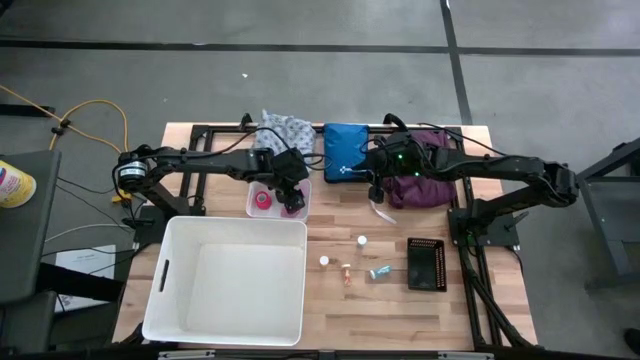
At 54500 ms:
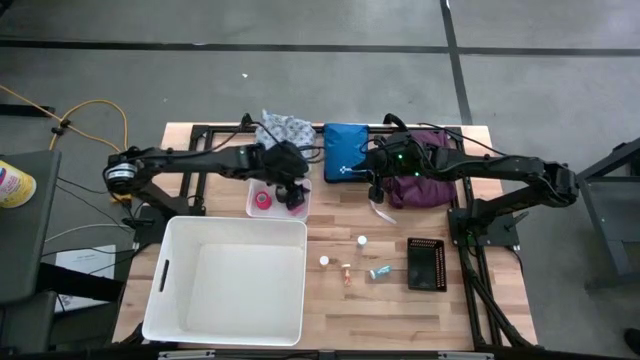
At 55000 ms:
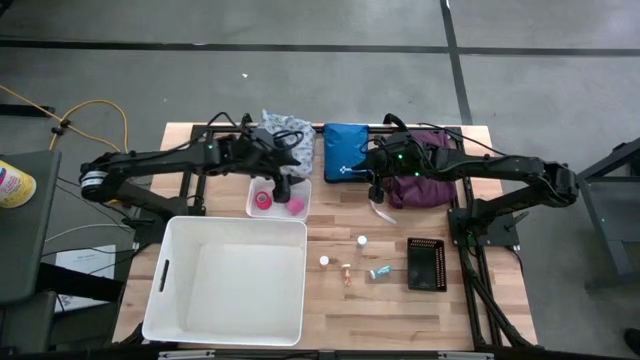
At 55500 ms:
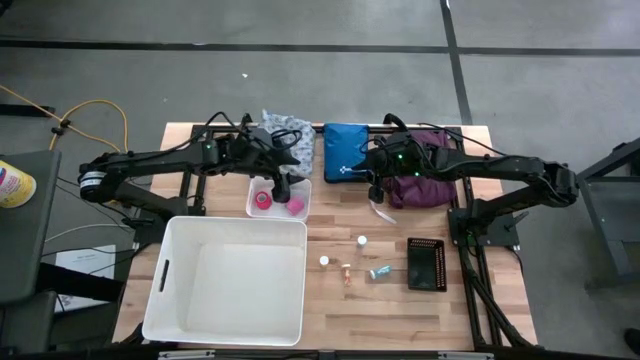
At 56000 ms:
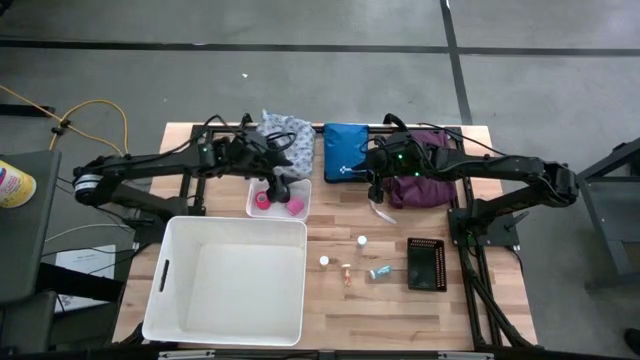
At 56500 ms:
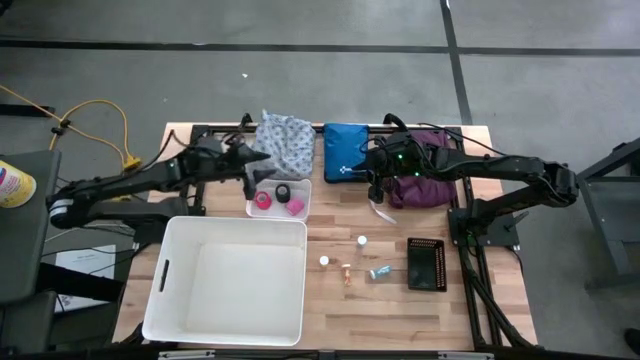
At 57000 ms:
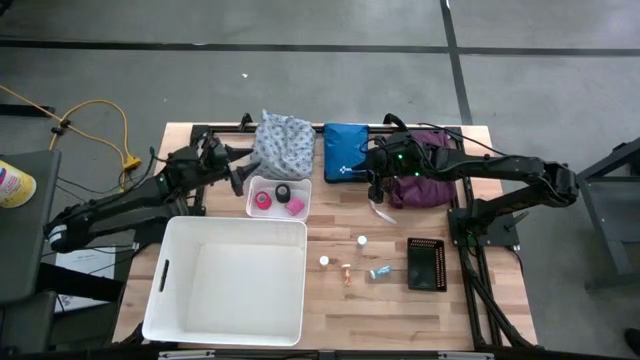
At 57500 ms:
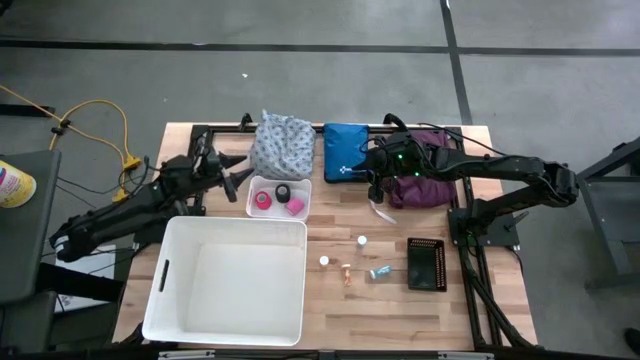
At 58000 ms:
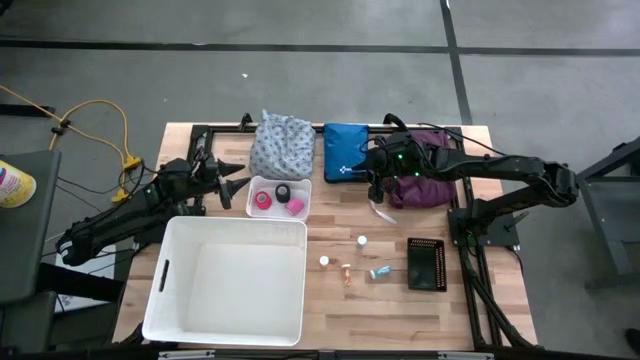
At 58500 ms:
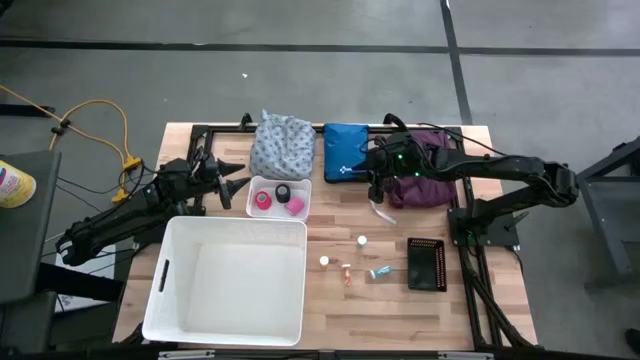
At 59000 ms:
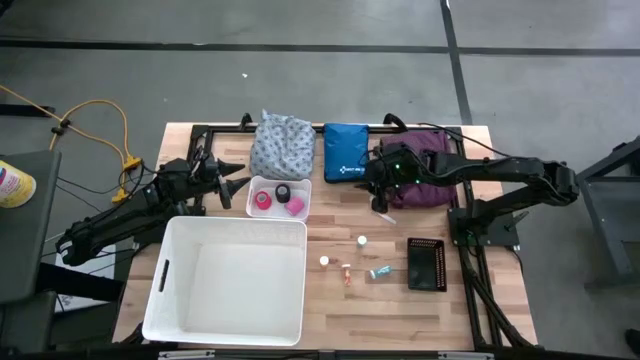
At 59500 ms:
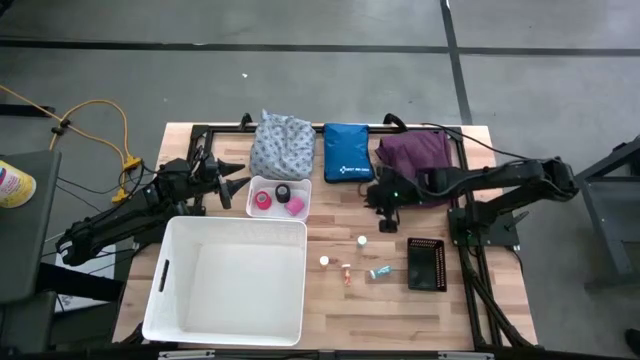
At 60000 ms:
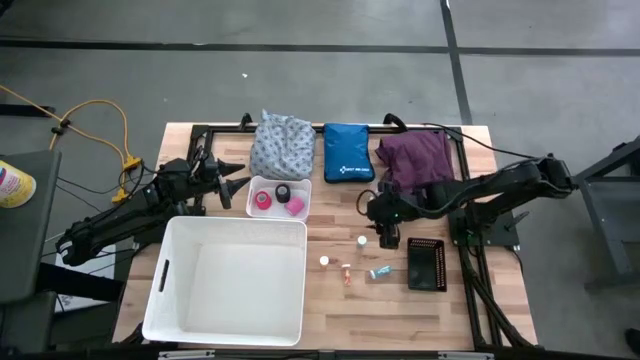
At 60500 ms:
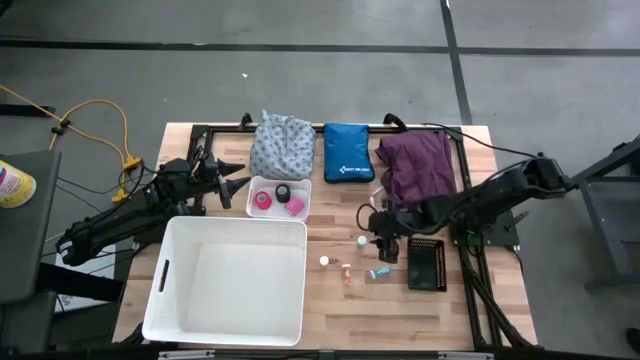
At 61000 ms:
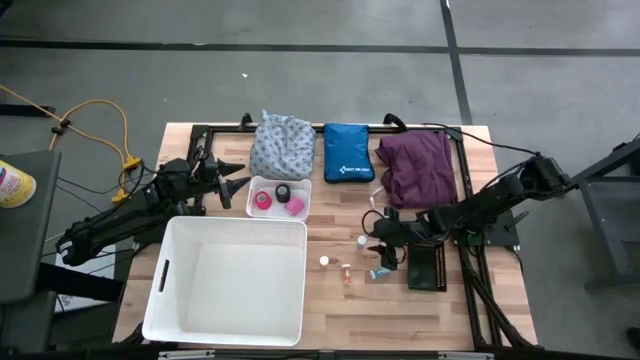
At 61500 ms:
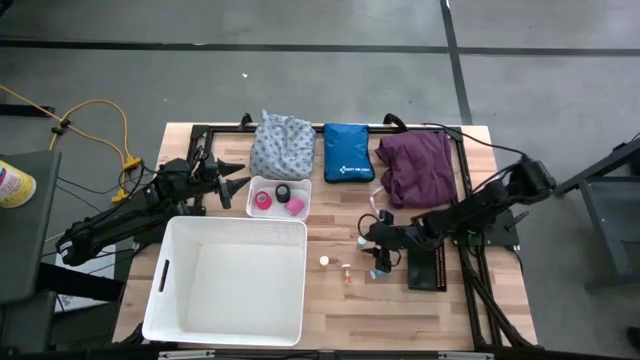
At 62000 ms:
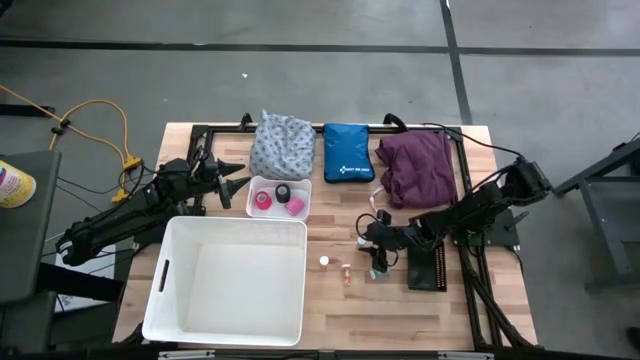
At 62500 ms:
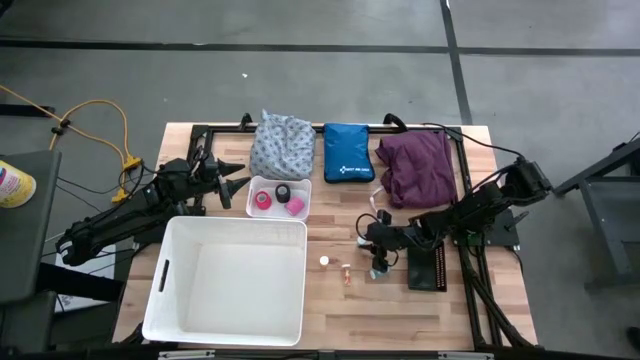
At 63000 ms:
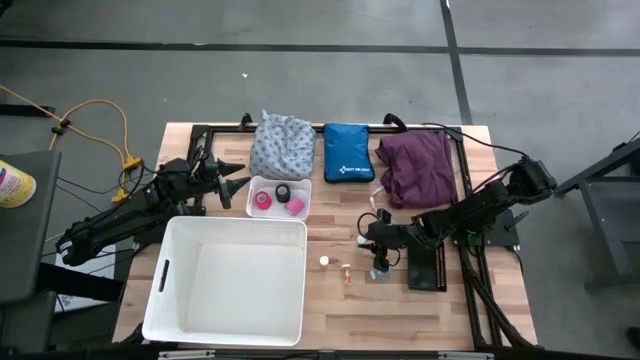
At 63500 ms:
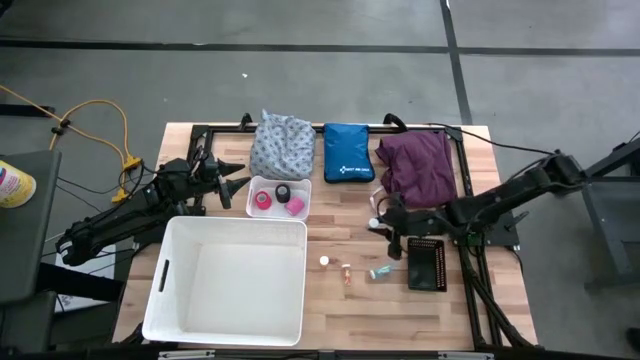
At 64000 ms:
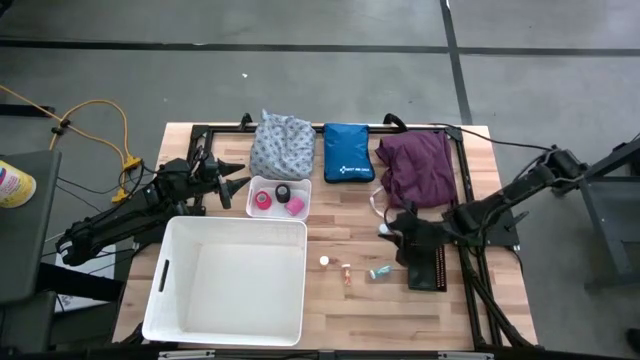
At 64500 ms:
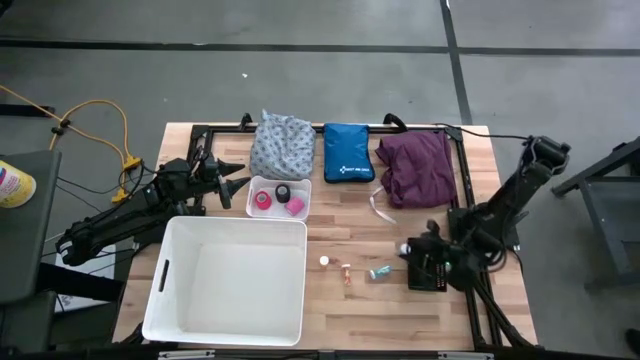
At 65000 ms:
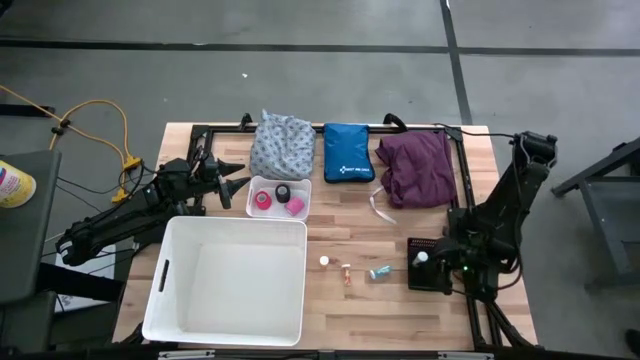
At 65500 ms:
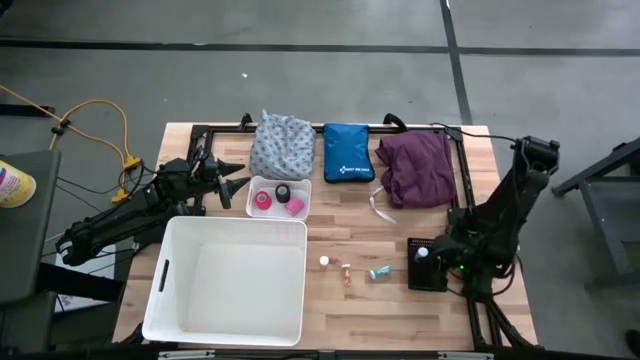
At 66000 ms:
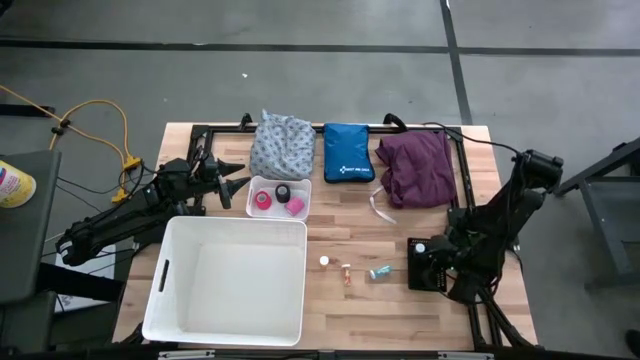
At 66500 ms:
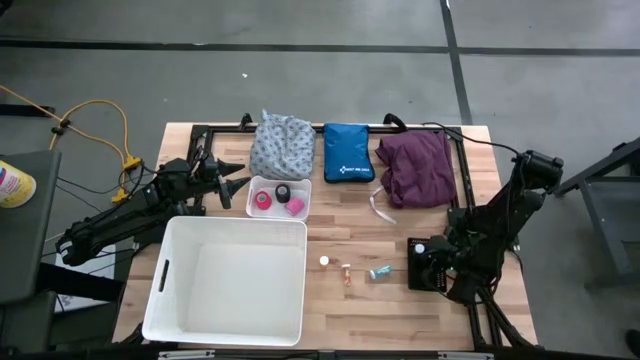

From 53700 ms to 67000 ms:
Task: Pick & place medical supplies in basket/bin
Put the top blue pill bottle into the black bin

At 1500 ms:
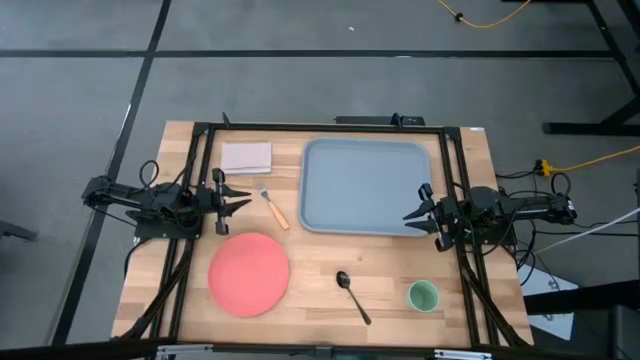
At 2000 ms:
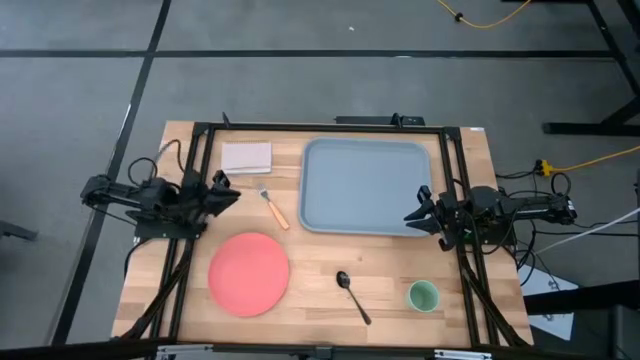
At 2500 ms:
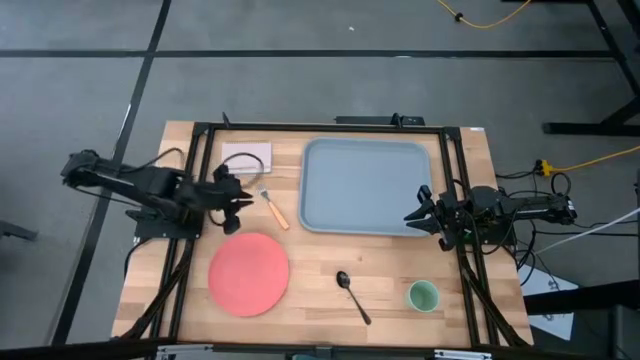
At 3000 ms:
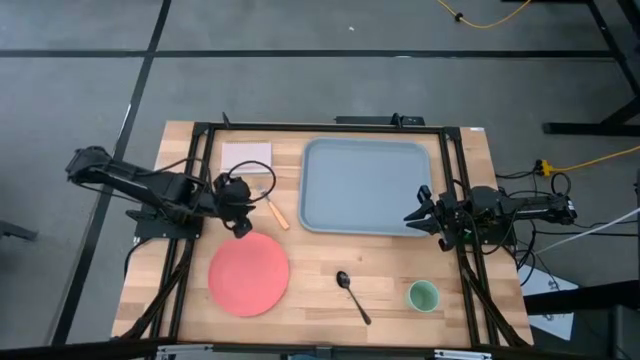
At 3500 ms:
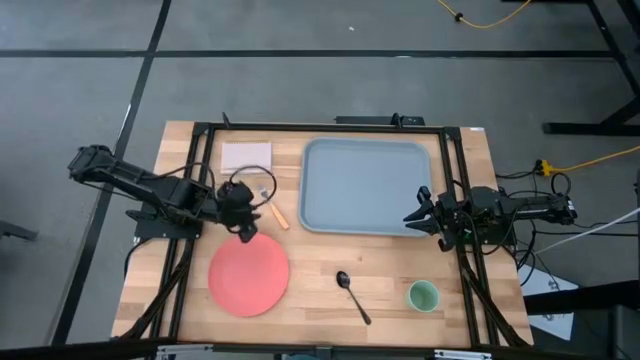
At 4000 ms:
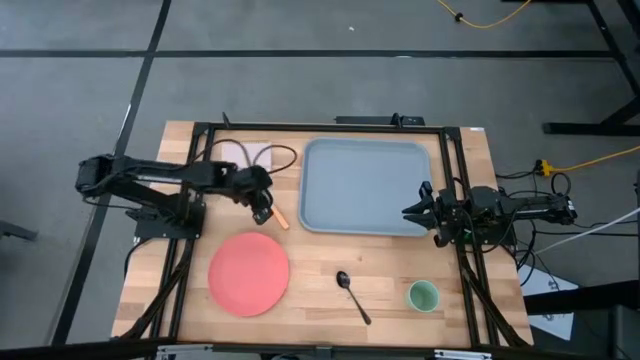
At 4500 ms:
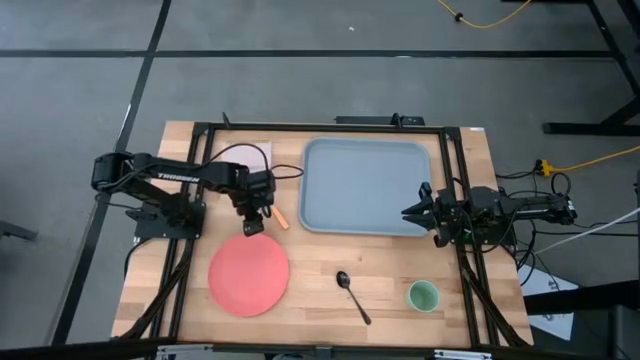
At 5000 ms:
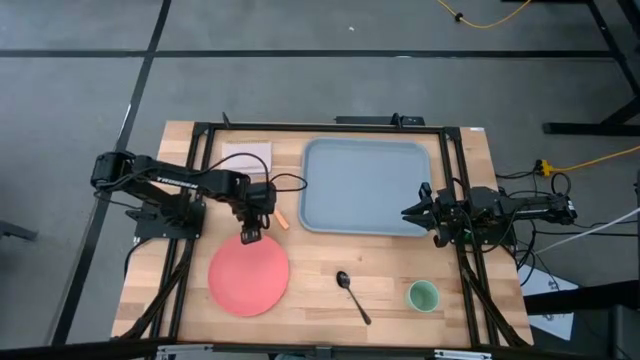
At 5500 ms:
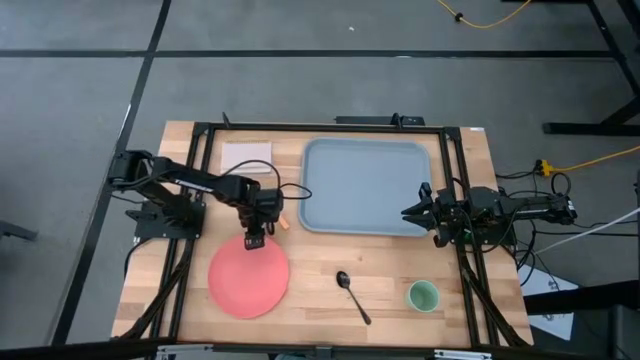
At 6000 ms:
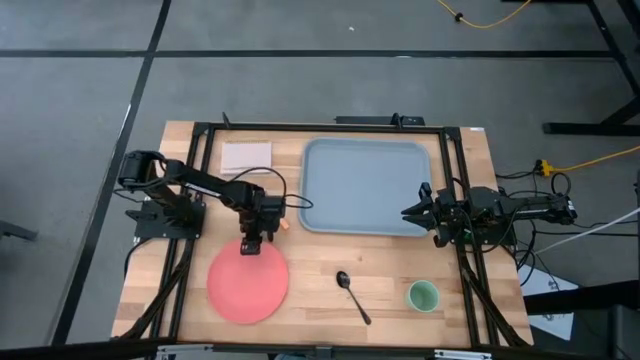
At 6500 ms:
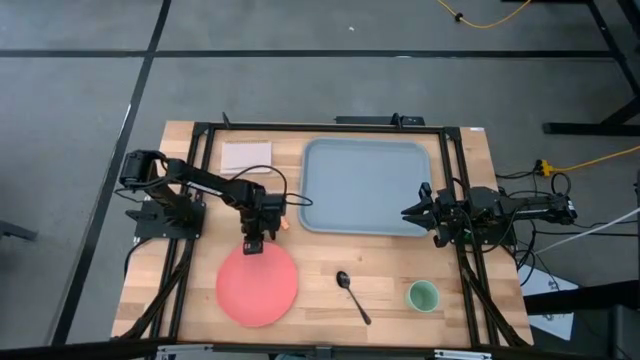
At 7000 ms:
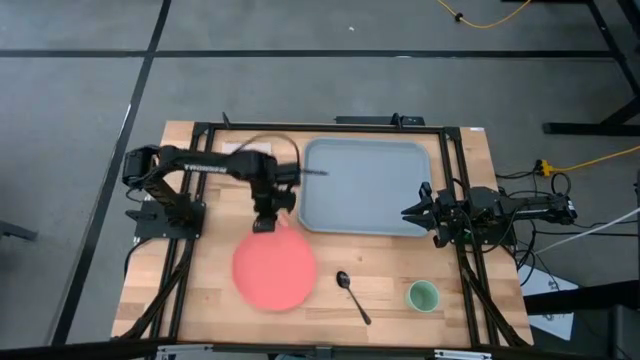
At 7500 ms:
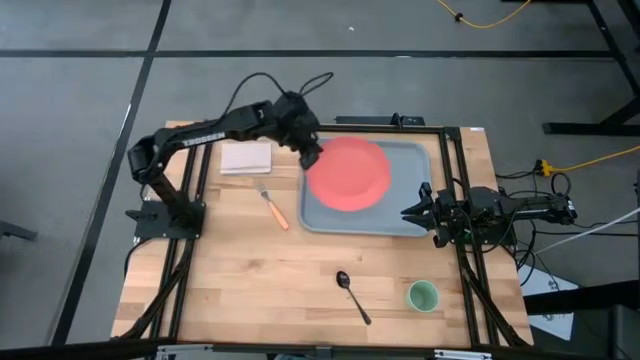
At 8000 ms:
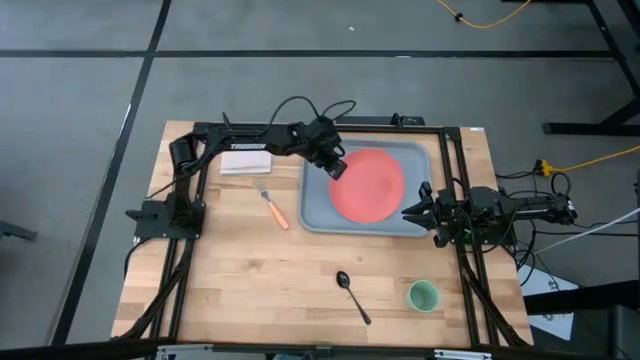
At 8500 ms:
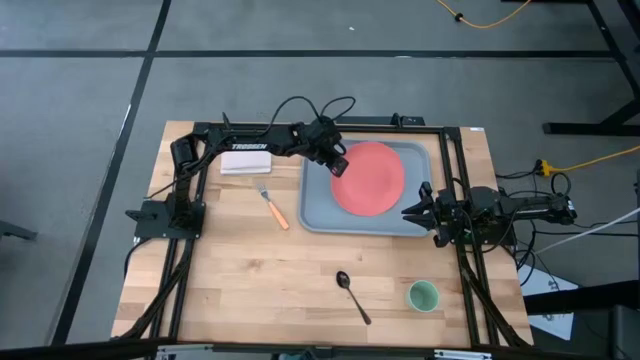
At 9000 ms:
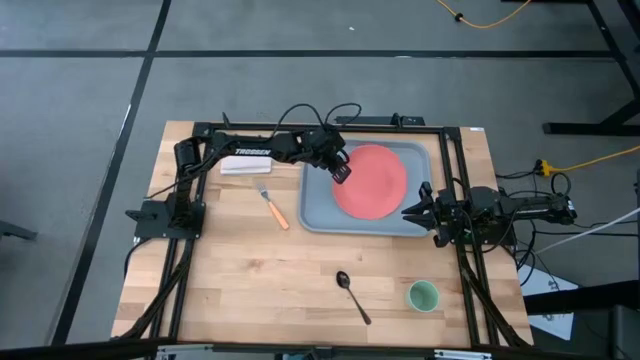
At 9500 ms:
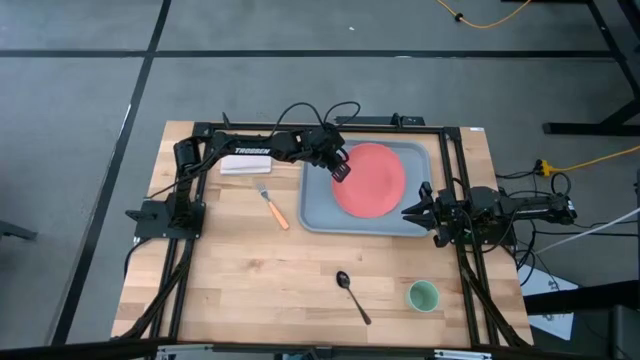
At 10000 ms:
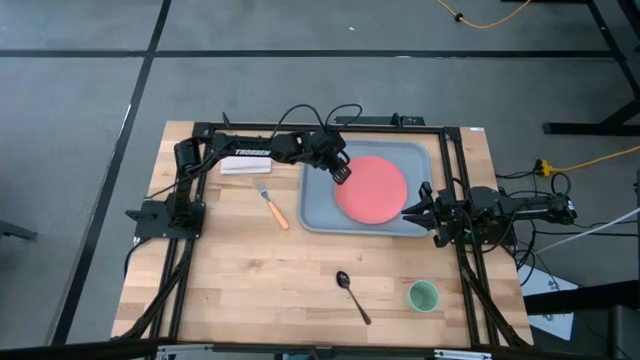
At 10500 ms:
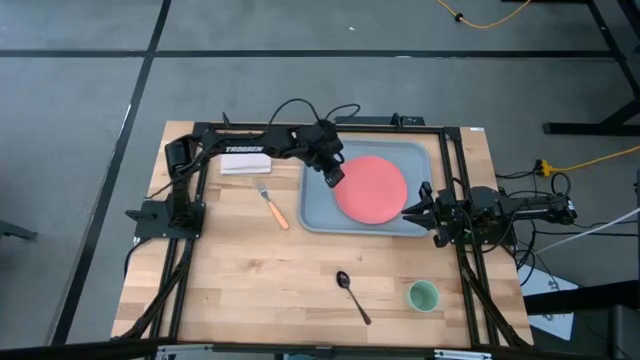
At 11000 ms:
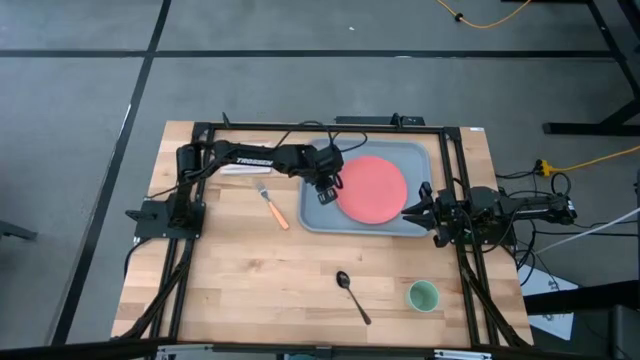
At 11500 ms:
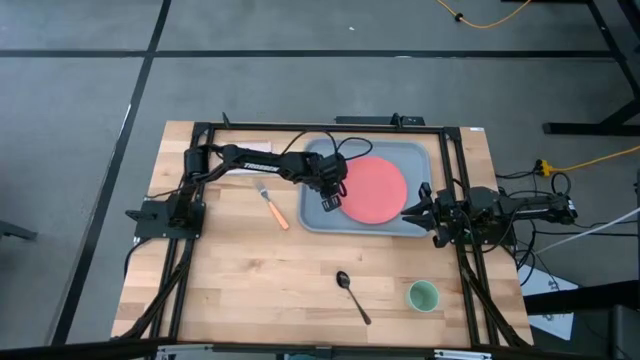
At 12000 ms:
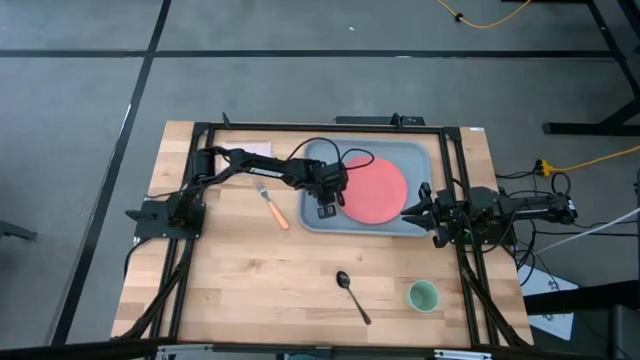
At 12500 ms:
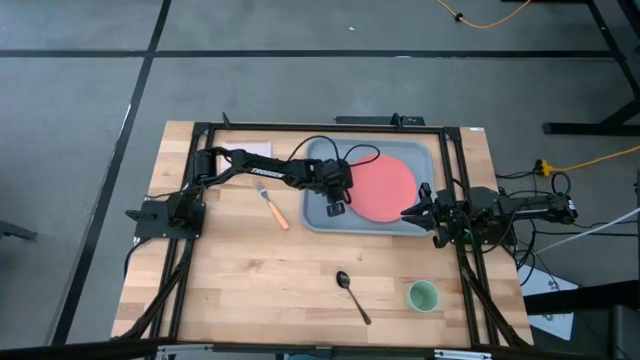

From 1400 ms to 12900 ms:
Task: Pick and place plate/cup/fork/spoon on tray
Put the pink plate on the gray serving tray
